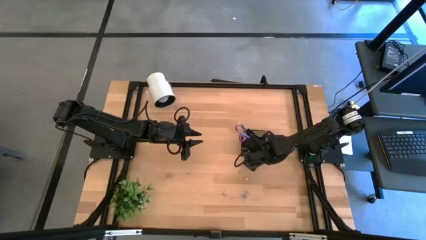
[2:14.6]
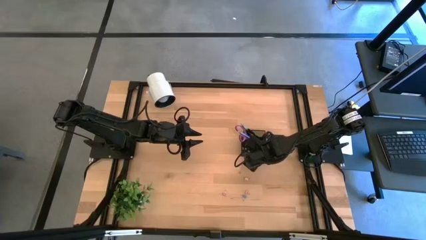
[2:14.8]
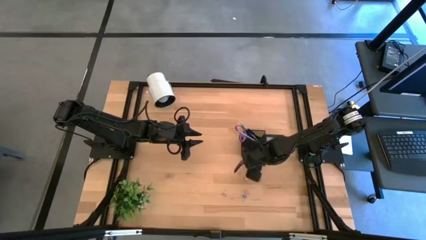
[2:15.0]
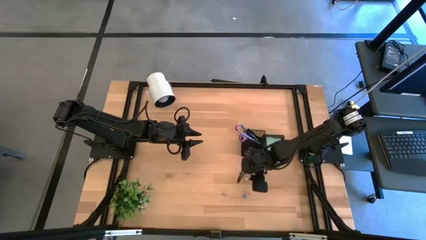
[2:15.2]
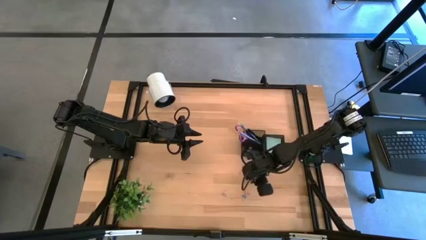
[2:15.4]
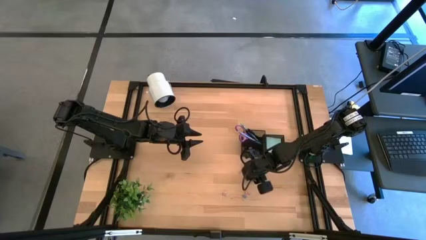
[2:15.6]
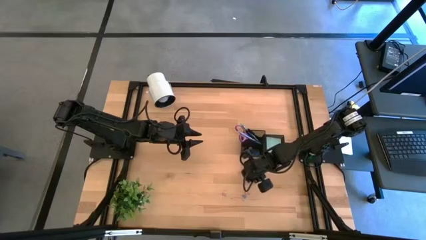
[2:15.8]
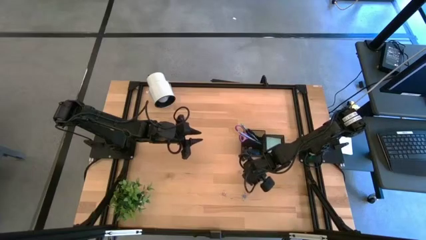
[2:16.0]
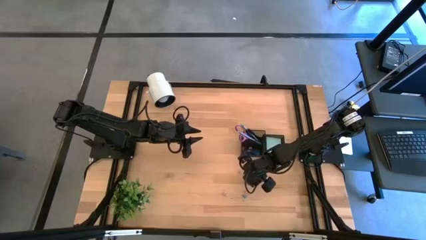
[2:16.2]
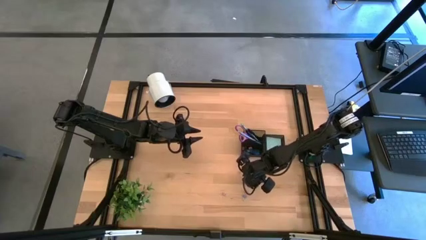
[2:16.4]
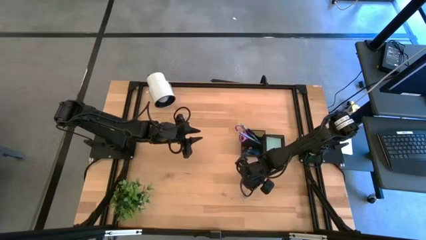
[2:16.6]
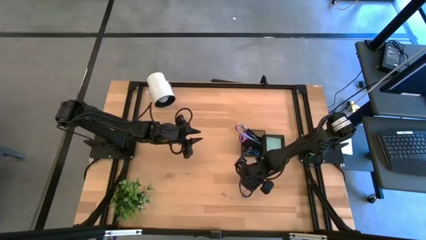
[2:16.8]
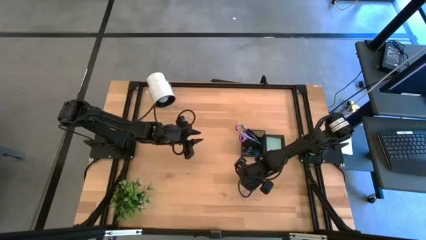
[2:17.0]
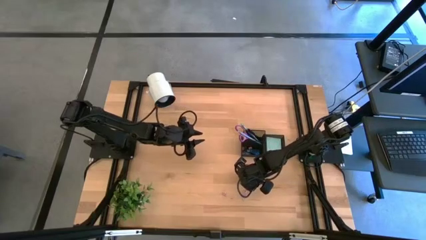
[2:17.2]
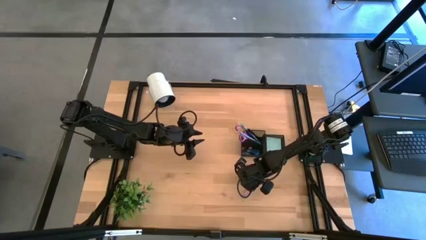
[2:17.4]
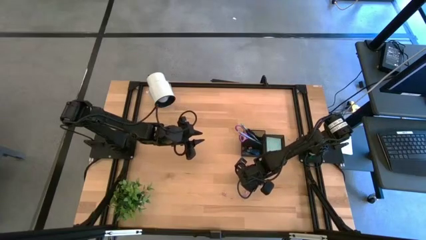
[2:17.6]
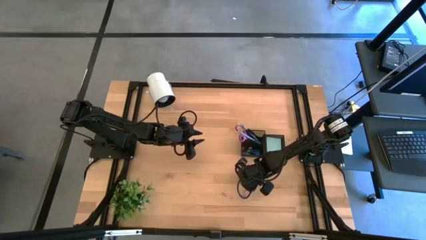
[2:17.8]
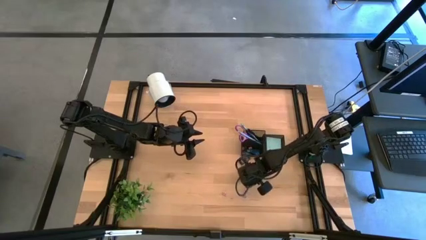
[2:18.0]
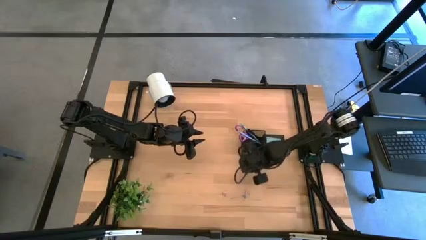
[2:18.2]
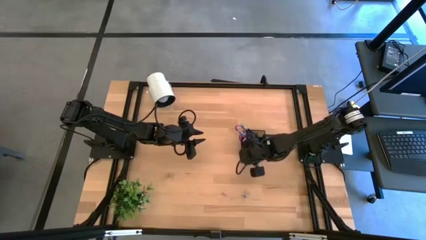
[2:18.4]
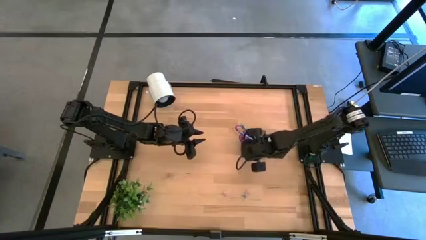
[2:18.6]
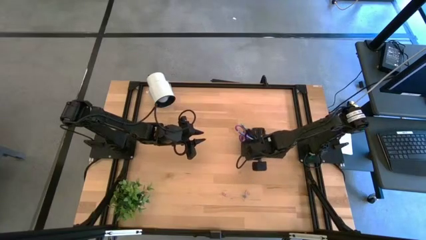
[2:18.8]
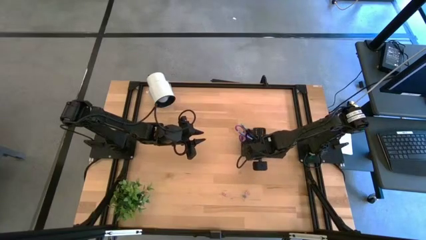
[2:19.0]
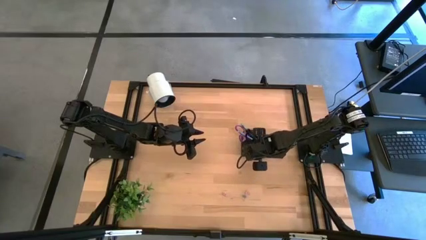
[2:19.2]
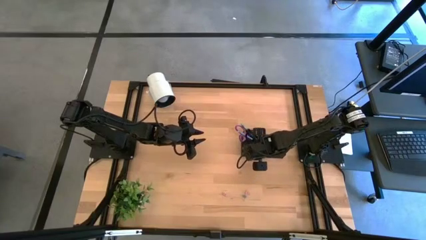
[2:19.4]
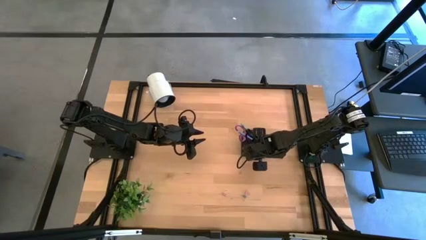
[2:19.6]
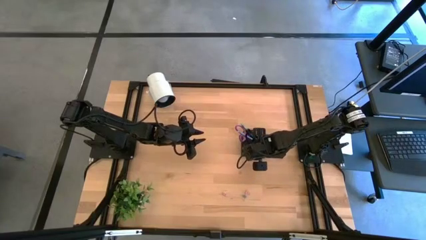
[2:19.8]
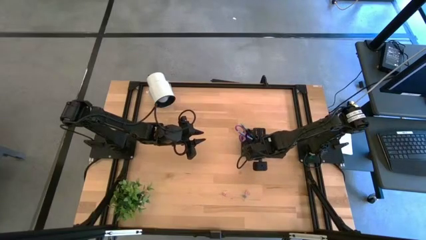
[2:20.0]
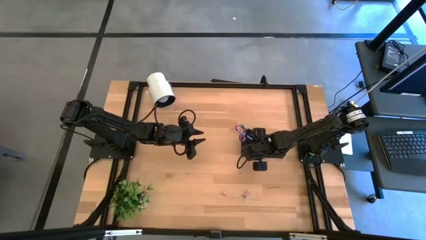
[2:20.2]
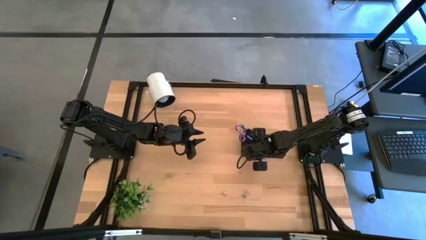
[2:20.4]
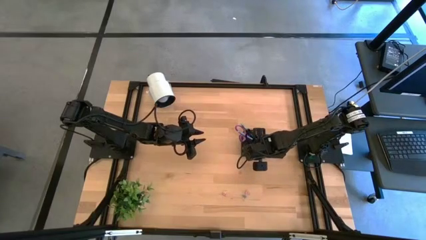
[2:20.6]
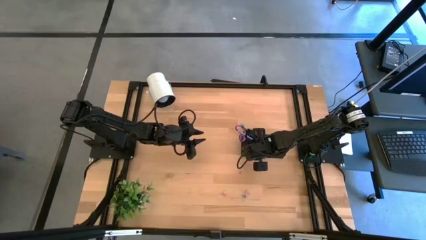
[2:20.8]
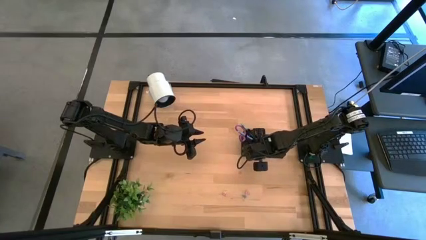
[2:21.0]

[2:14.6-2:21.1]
Task: Pick and place office supplies into organizer
Put the brown binder clip into the black desk organizer

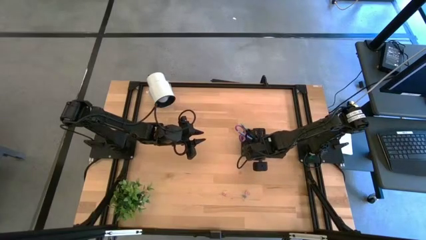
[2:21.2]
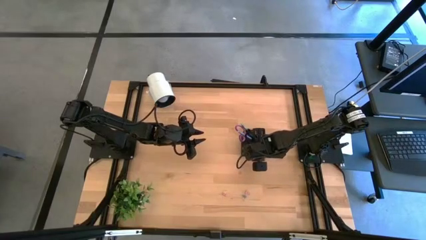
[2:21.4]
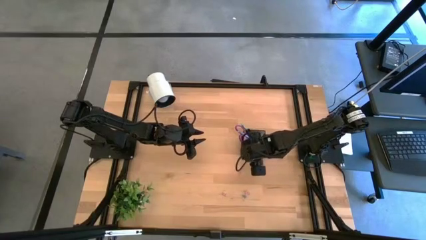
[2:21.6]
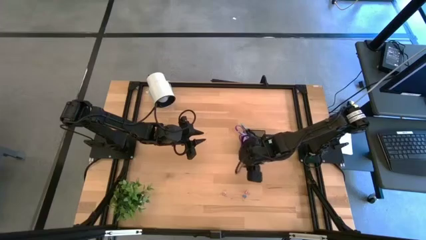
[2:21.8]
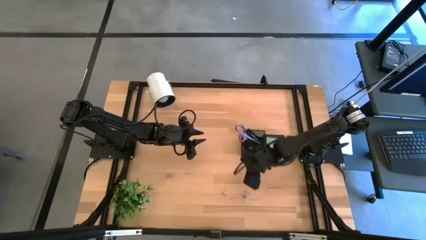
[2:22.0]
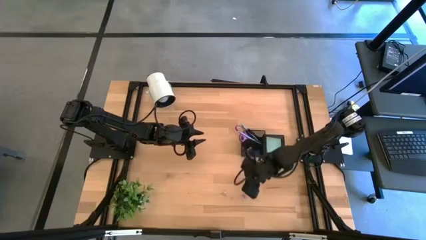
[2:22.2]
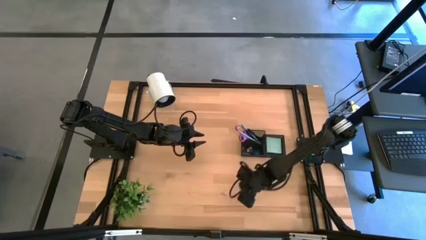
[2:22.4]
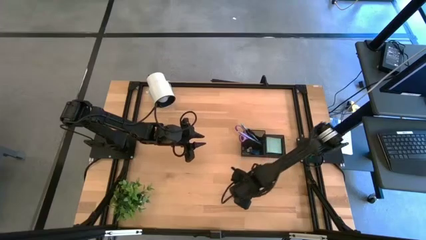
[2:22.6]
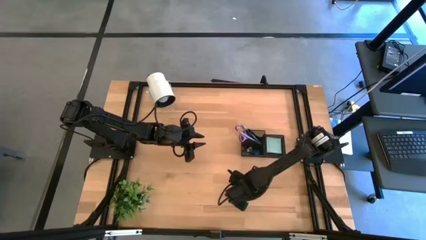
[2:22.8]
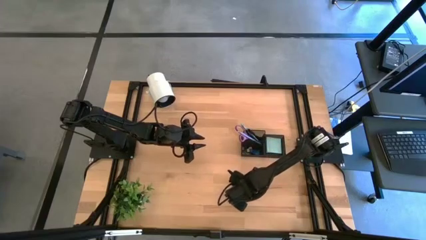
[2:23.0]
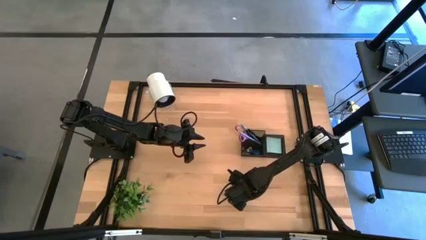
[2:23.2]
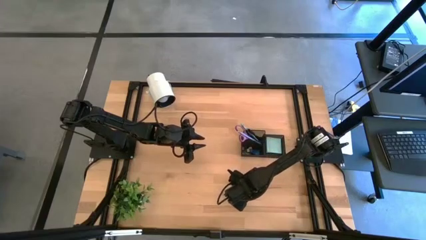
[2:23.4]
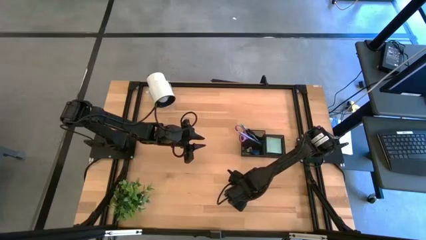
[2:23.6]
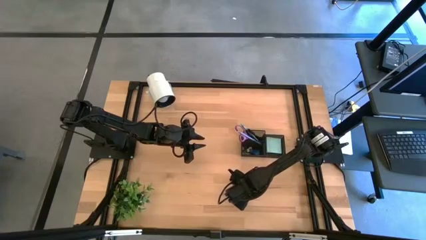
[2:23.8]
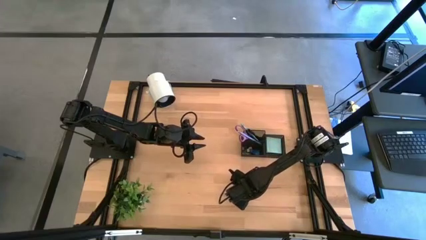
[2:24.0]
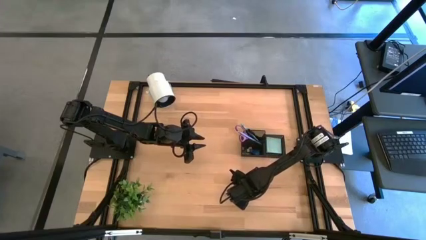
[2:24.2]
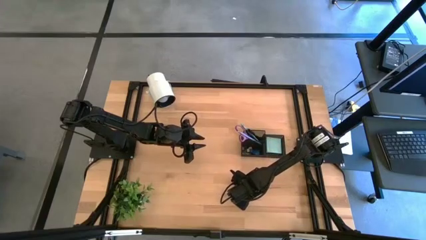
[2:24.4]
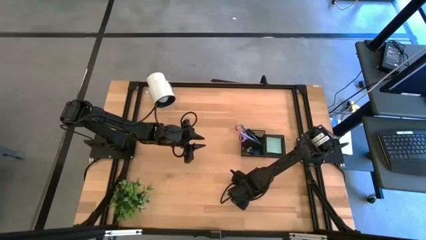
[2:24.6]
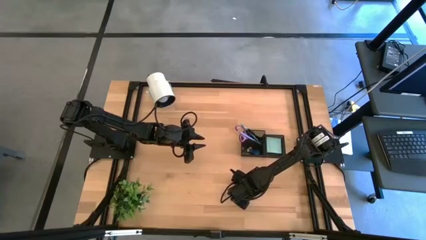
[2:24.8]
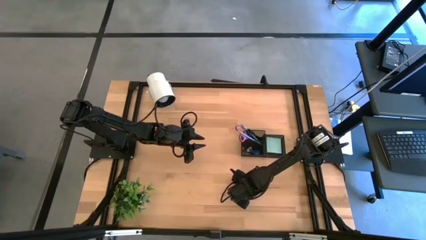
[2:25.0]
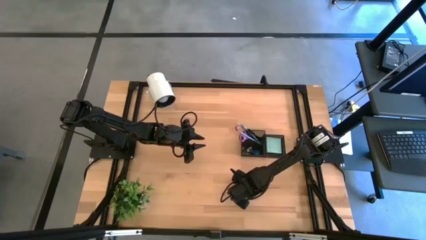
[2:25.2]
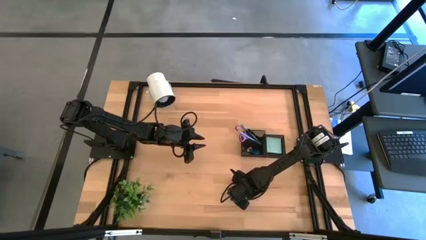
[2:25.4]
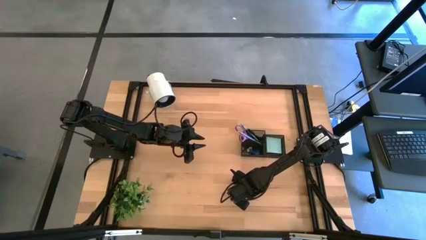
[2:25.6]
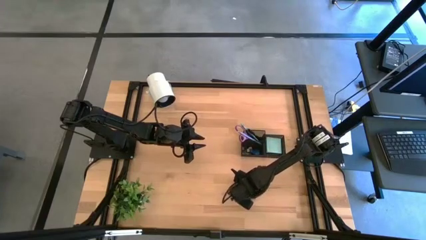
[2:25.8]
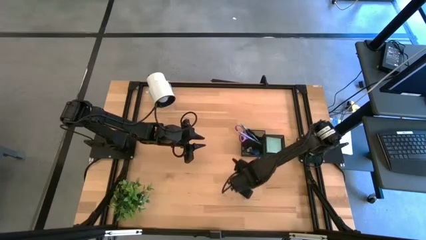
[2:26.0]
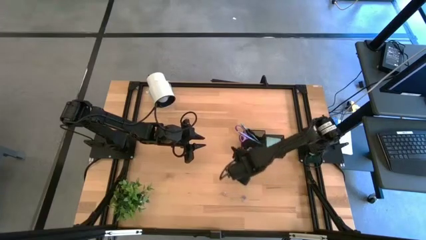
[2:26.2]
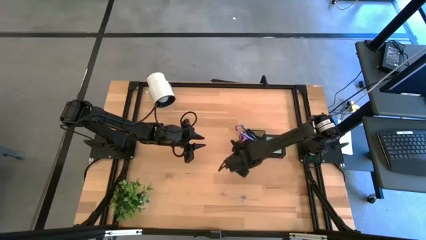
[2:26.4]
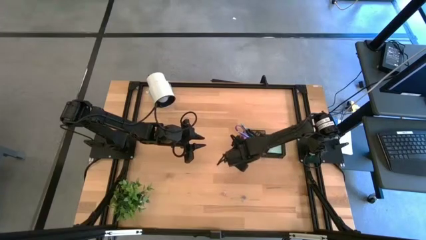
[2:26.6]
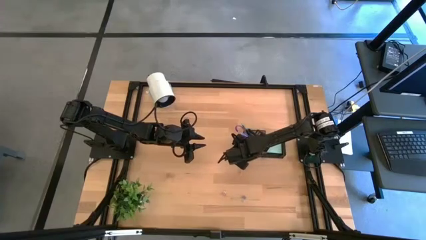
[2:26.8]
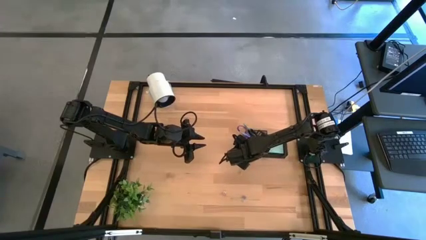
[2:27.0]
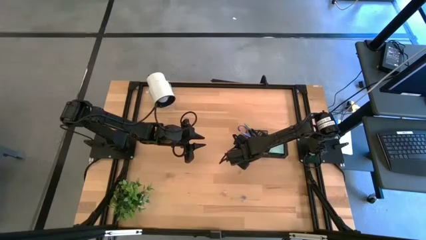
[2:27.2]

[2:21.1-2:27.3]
Put the pink binder clip into the black desk organizer

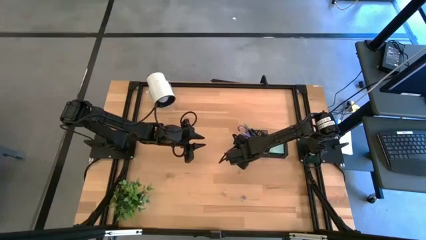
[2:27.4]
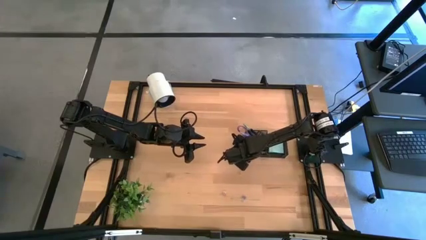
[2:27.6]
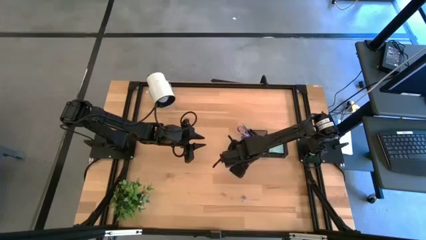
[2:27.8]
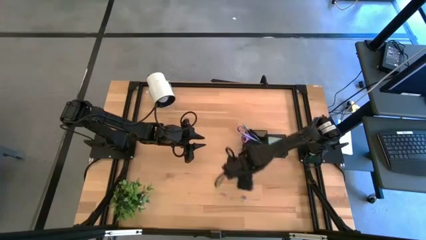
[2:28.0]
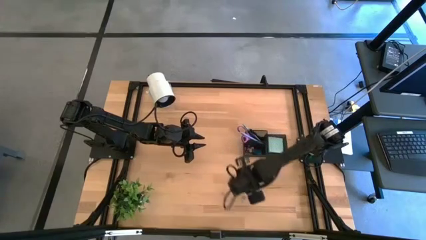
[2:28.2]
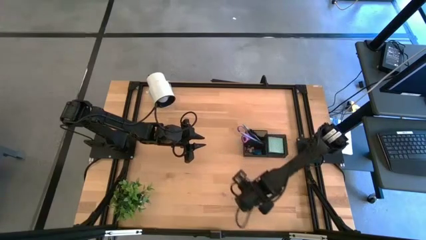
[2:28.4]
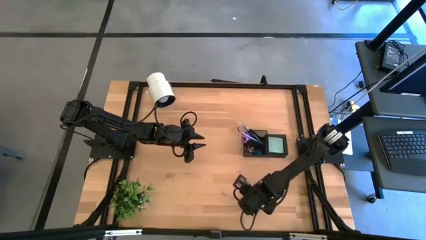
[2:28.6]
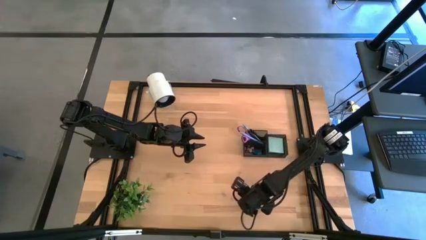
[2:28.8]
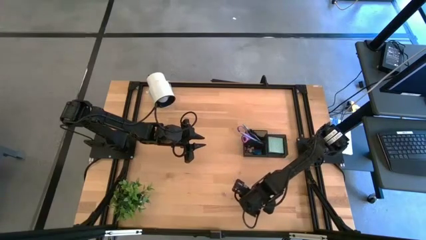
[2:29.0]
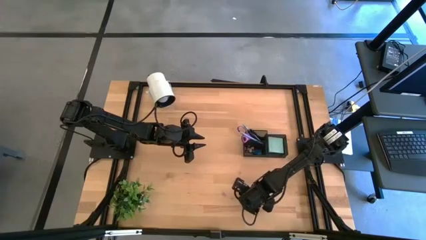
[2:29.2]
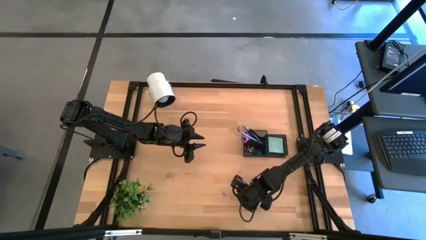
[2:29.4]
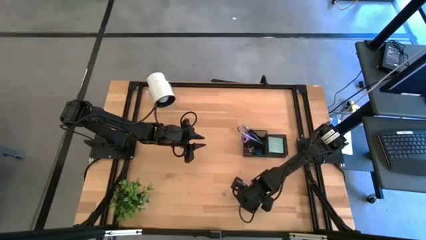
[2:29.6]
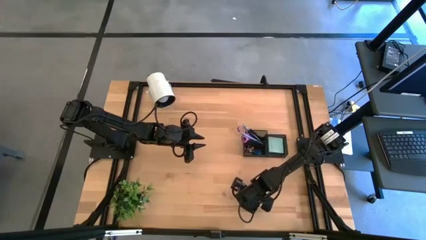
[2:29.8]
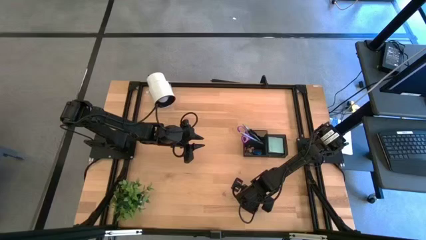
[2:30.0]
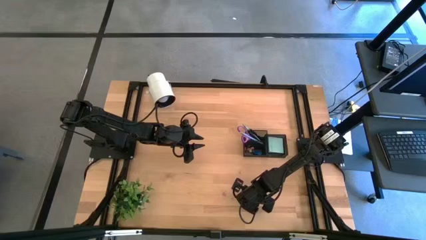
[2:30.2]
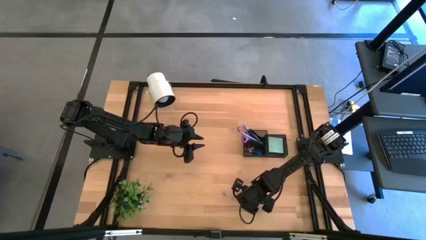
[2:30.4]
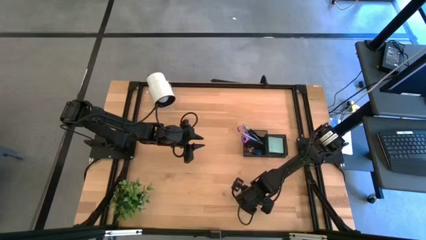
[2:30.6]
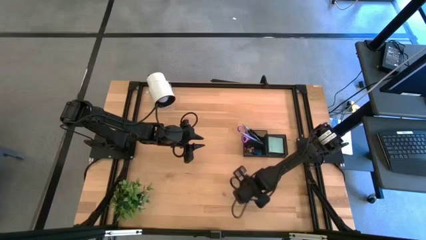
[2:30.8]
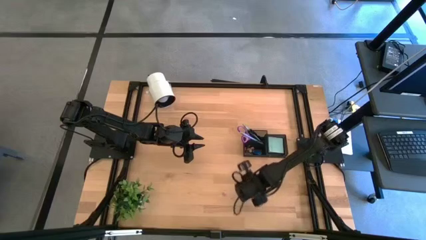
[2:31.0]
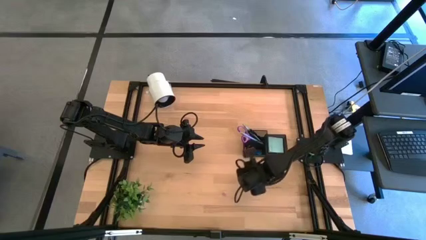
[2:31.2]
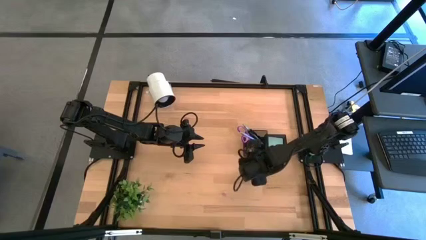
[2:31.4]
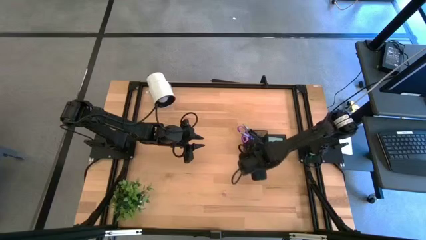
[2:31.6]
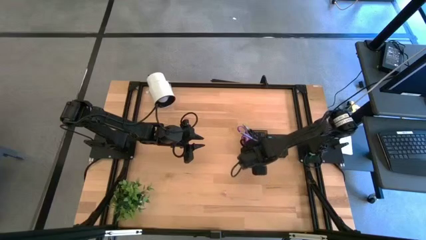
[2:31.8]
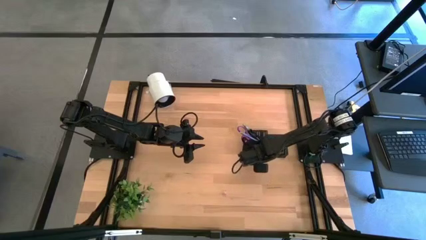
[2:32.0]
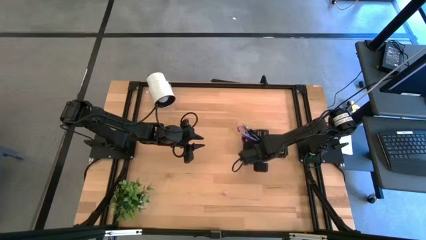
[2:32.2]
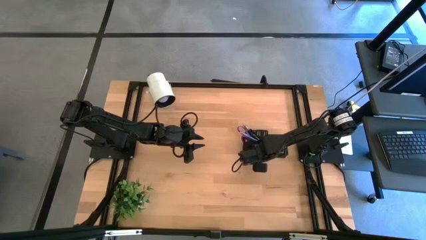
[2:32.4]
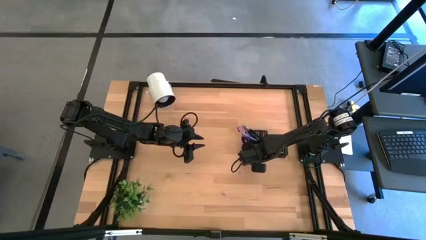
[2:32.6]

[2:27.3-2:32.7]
Put the blue binder clip into the black desk organizer
